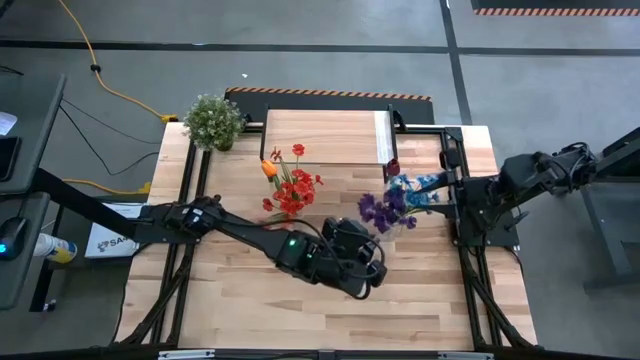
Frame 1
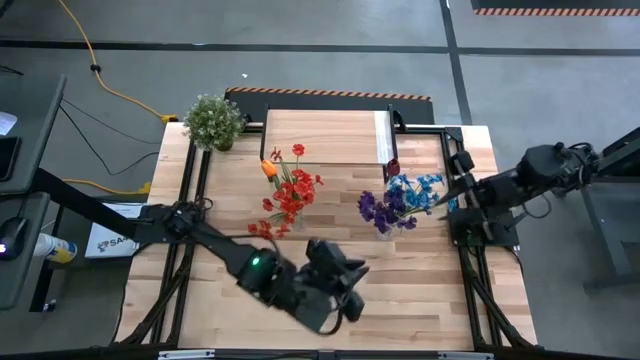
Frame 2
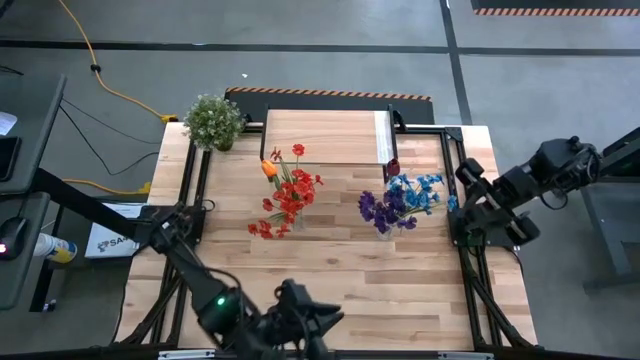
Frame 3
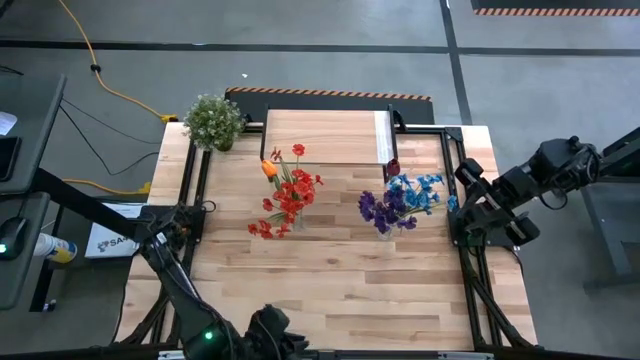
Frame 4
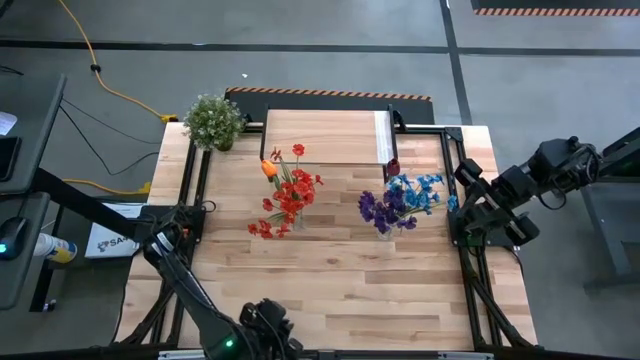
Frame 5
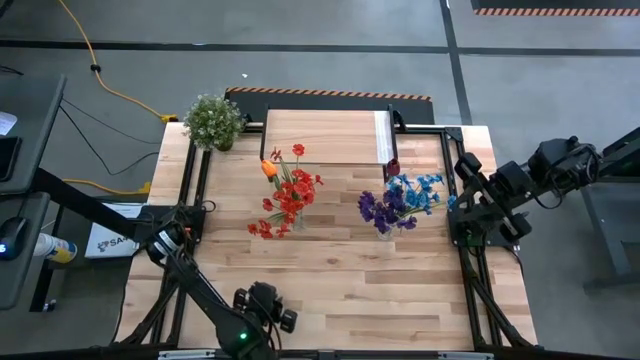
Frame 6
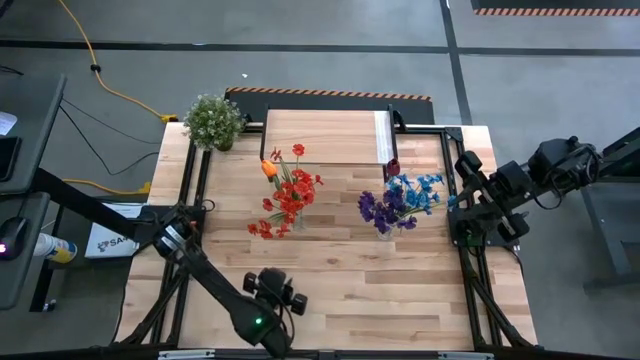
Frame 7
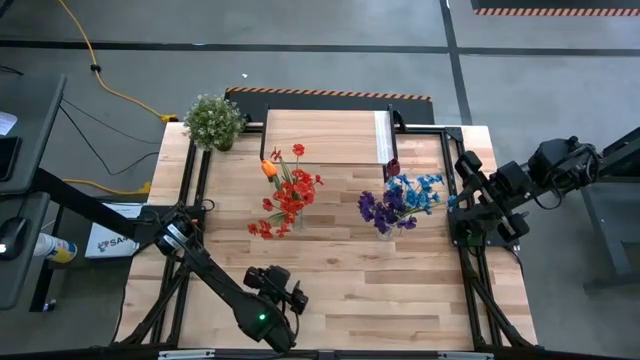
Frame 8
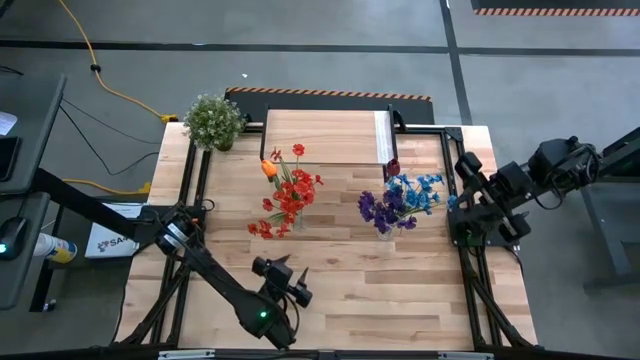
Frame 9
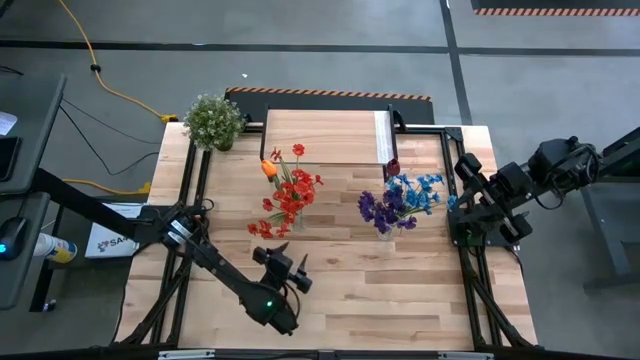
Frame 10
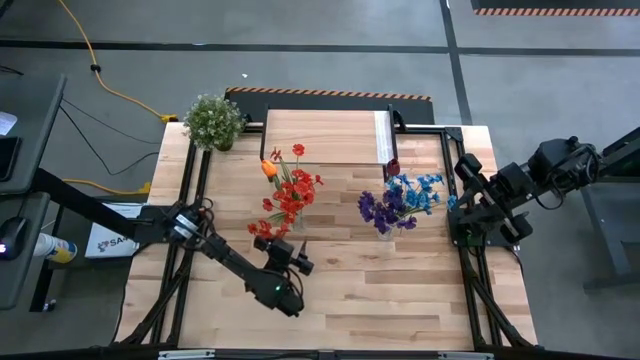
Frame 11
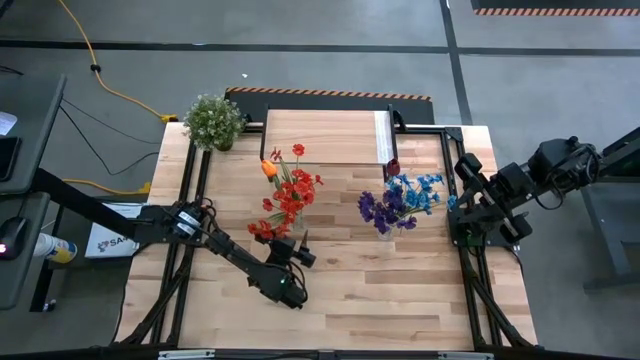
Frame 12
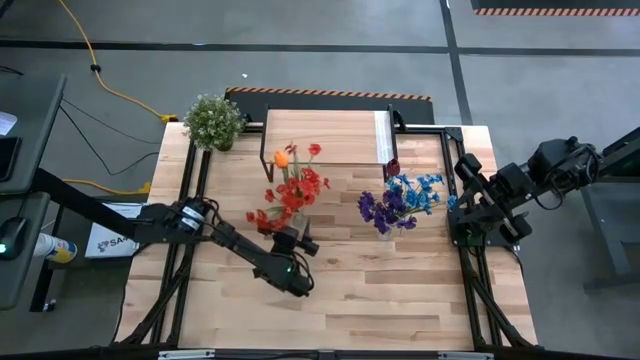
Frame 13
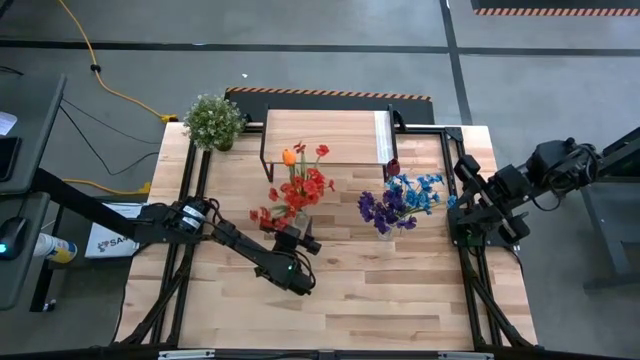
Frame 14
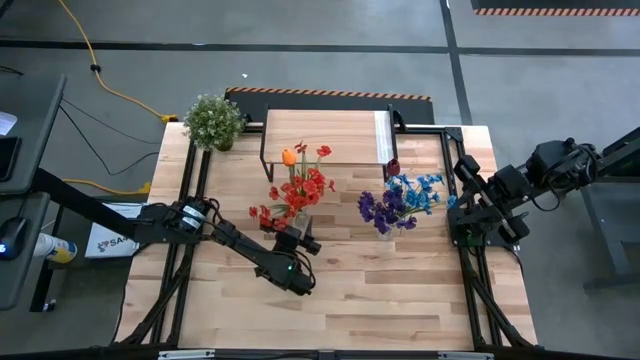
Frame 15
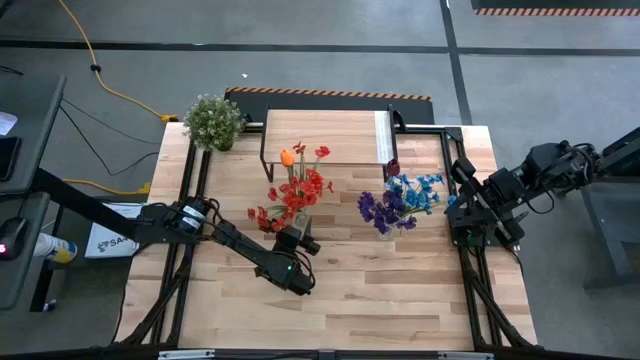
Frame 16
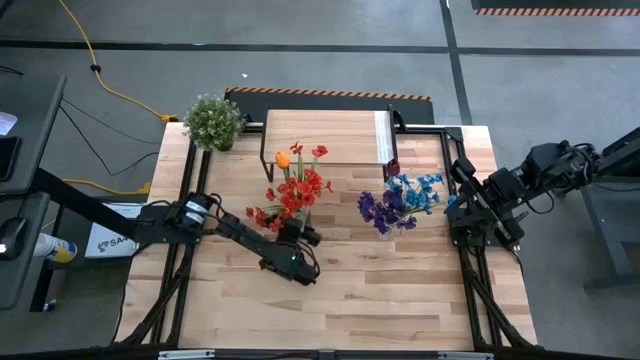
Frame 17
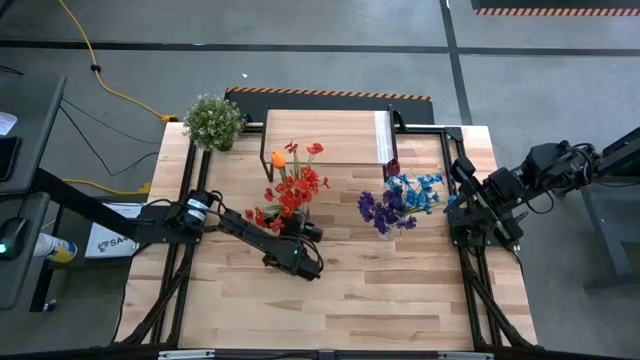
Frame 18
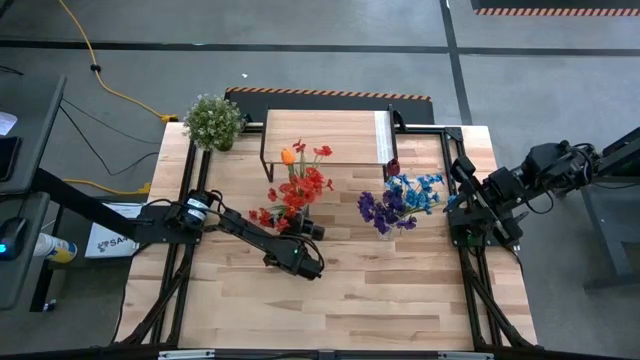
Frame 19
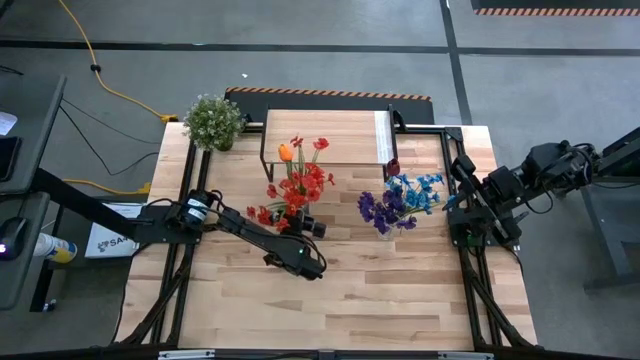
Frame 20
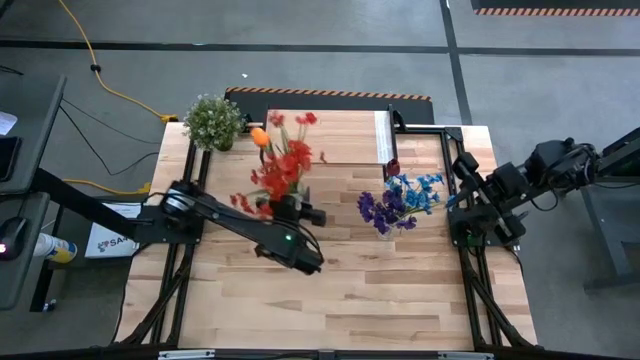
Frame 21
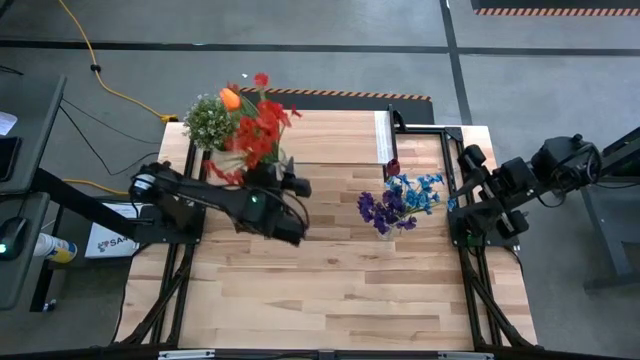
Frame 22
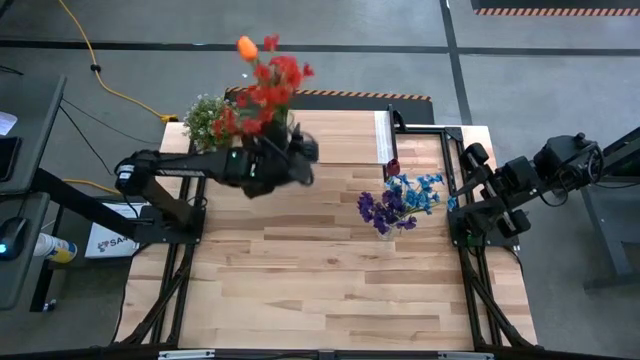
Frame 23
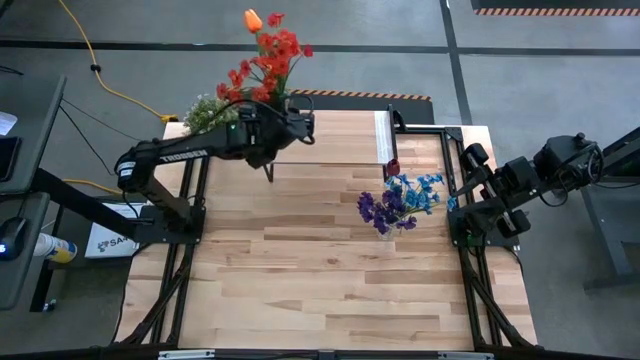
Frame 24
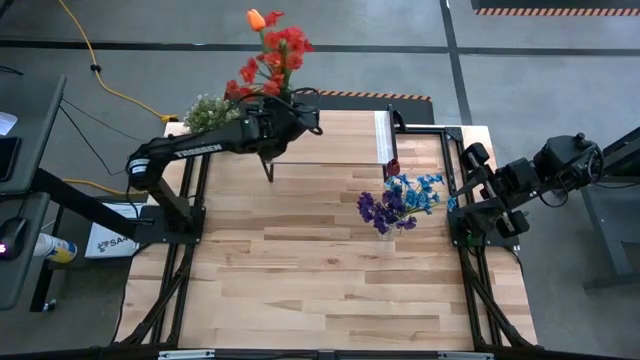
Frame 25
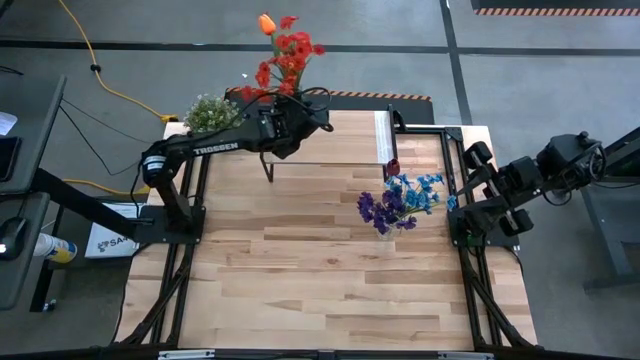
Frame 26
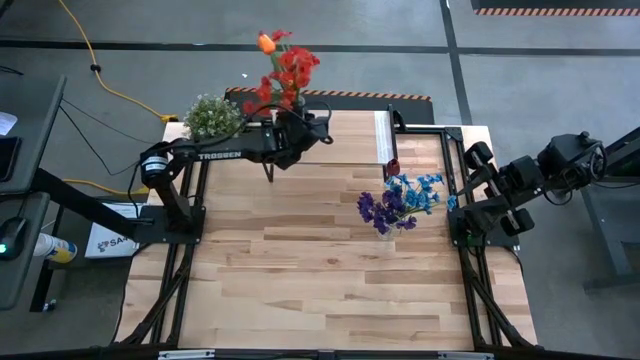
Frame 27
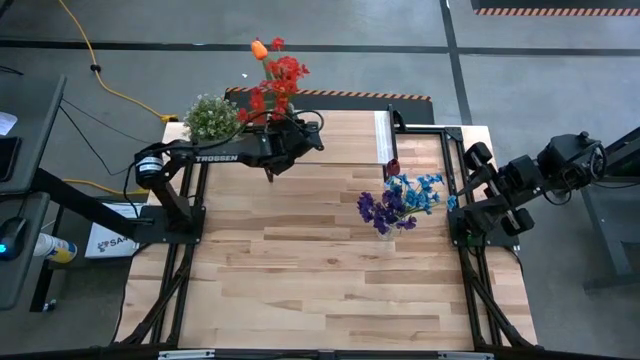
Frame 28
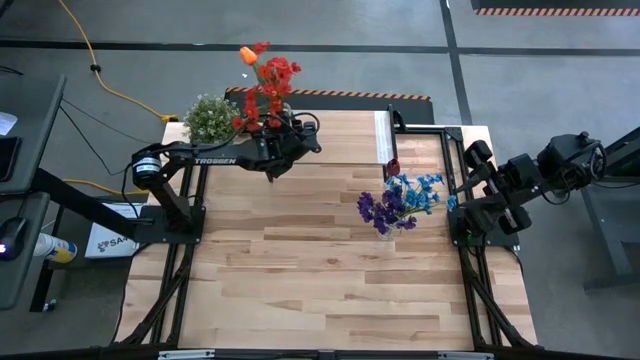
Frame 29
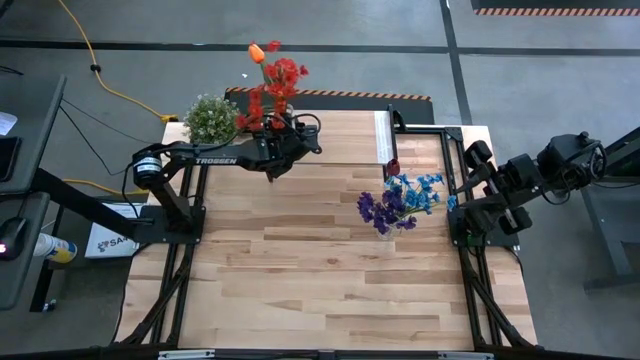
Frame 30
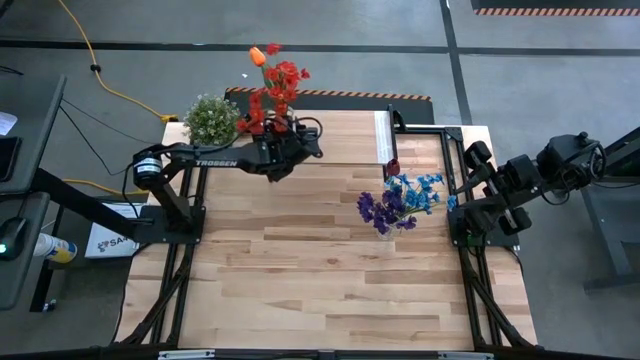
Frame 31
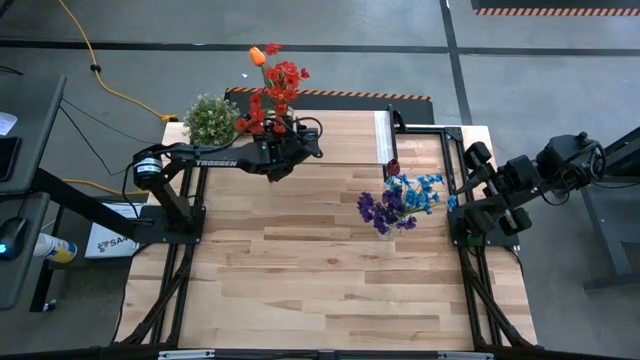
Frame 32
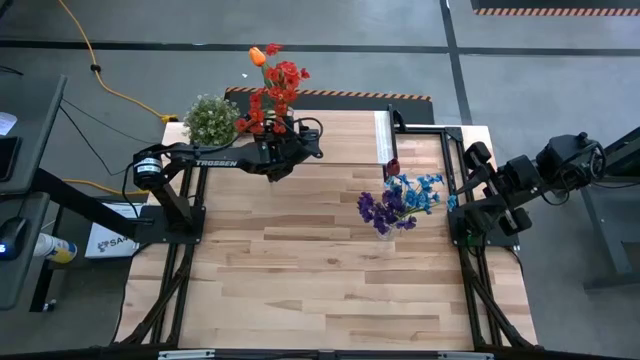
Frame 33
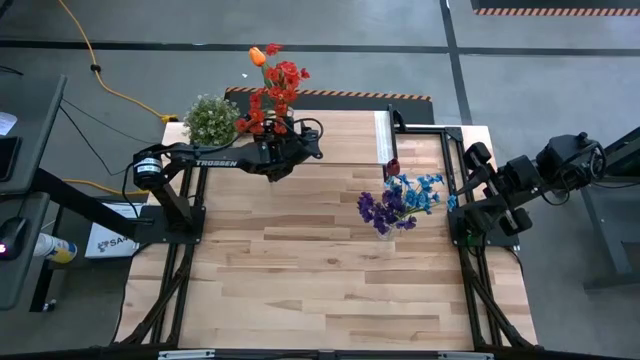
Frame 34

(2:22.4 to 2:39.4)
Task: Pick and place flowers into a vace then onto a shelf
Put the left transparent vase on the shelf

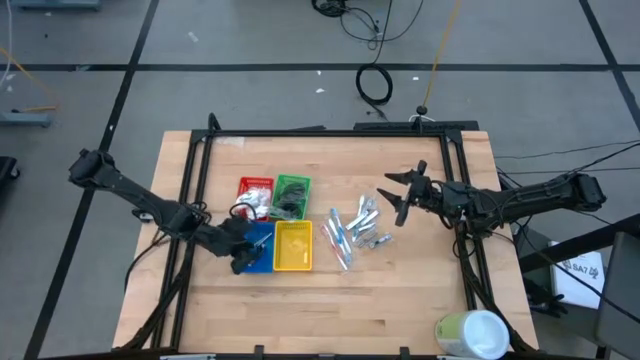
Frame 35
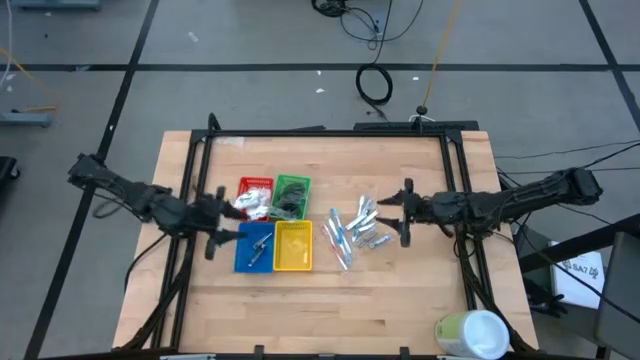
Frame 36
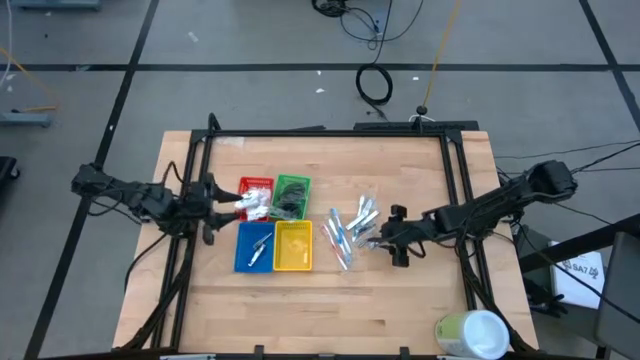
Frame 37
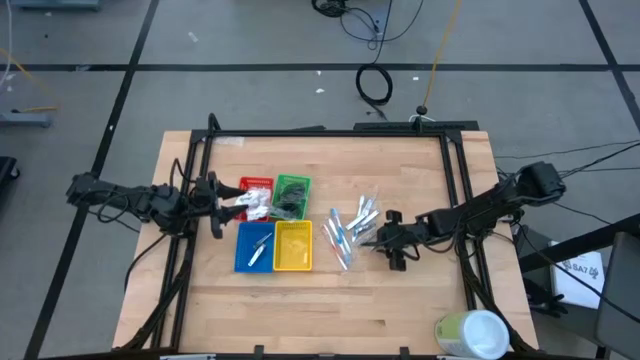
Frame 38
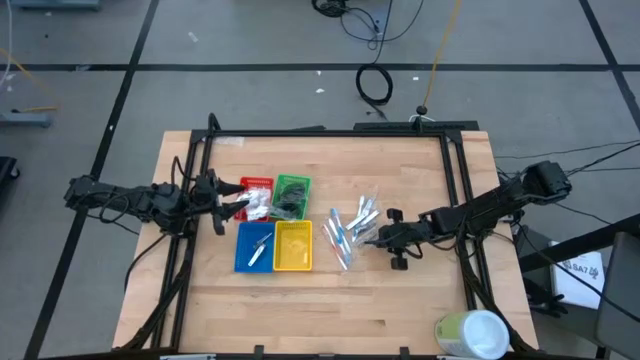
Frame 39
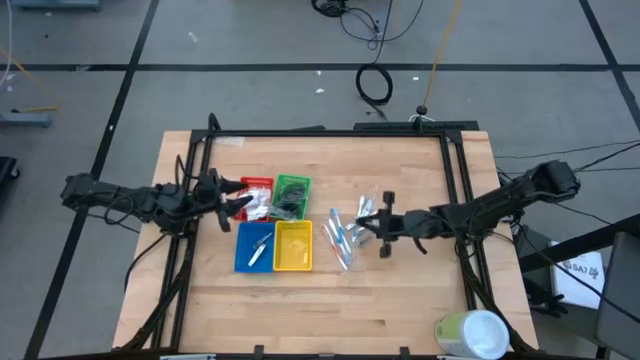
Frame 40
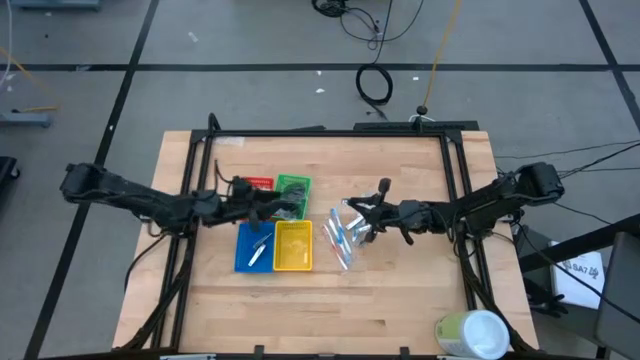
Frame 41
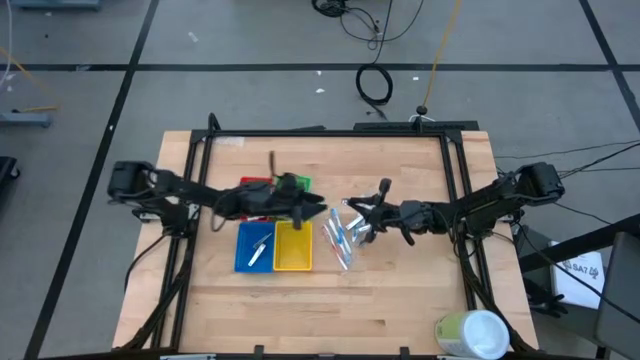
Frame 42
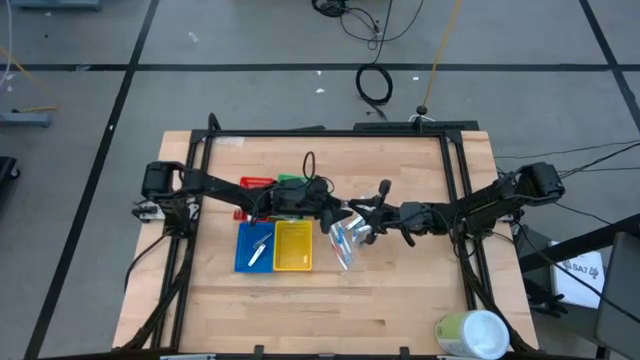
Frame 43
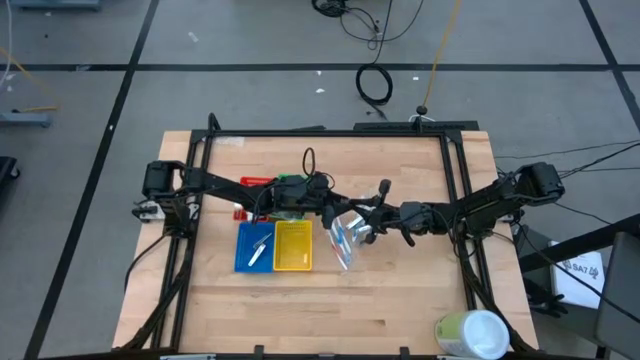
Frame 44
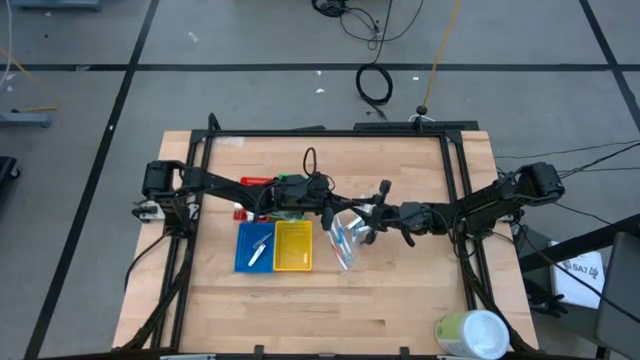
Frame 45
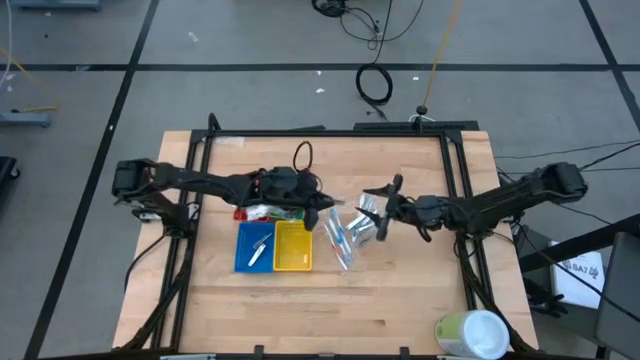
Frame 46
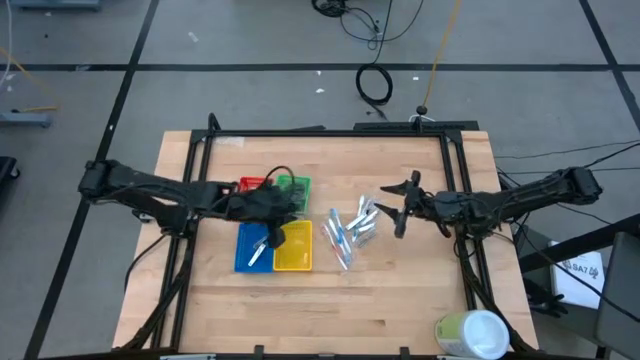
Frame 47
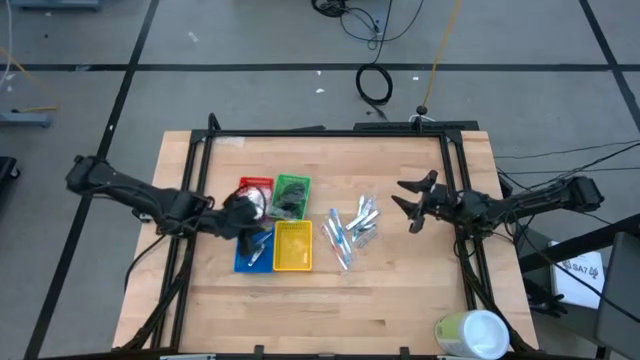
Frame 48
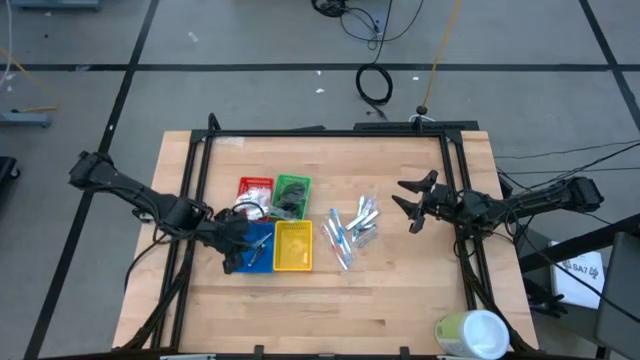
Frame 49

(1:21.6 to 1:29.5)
Task: Pick & Place Travel size toiletries
Put the silver nail cutter into the blue bin
